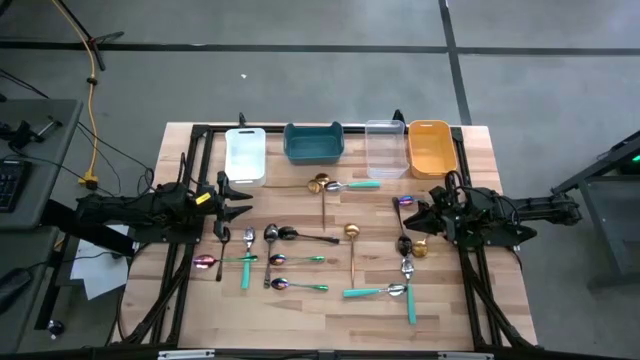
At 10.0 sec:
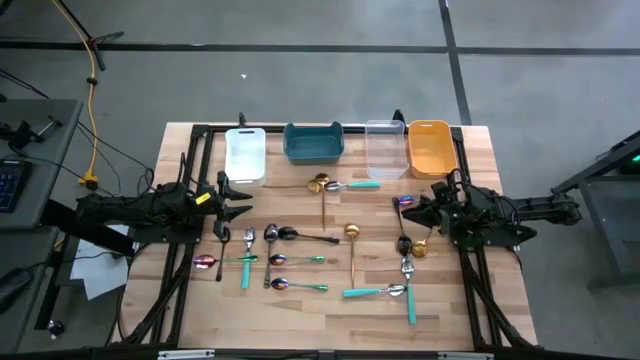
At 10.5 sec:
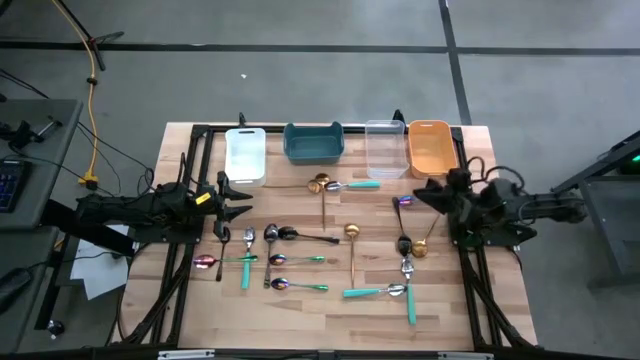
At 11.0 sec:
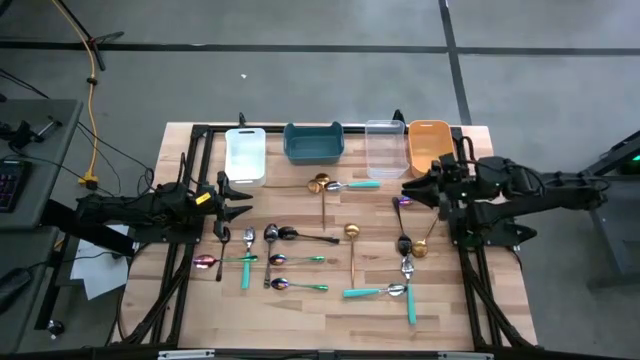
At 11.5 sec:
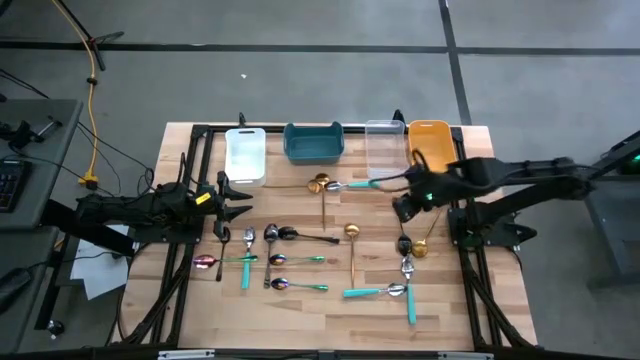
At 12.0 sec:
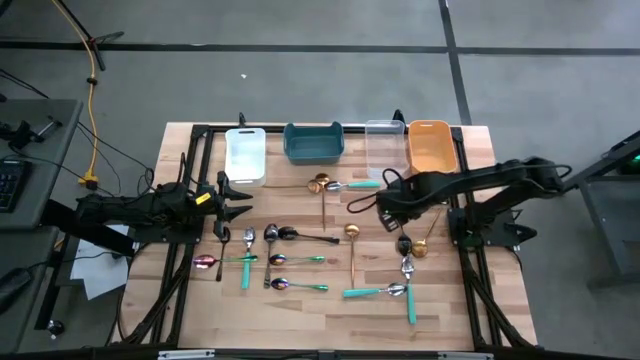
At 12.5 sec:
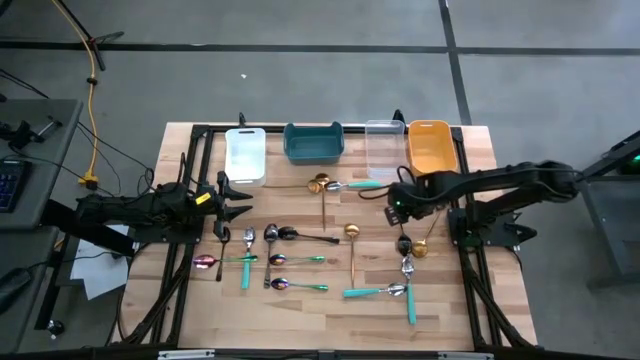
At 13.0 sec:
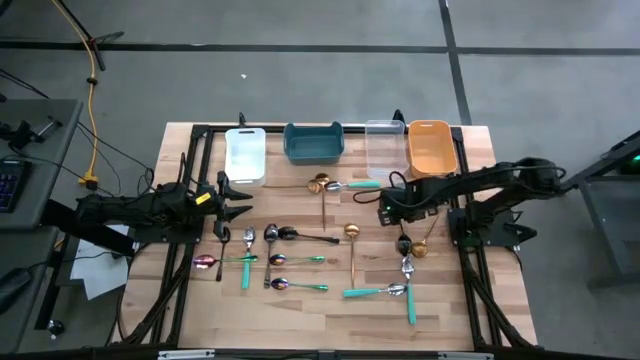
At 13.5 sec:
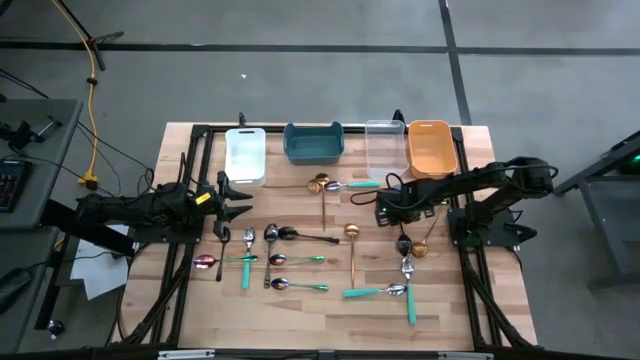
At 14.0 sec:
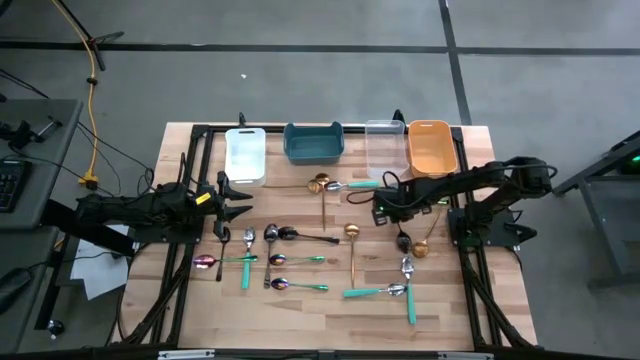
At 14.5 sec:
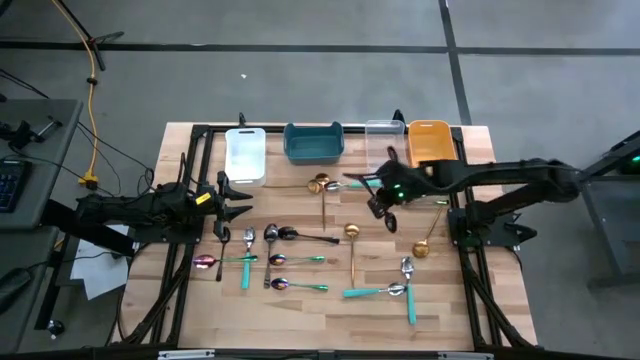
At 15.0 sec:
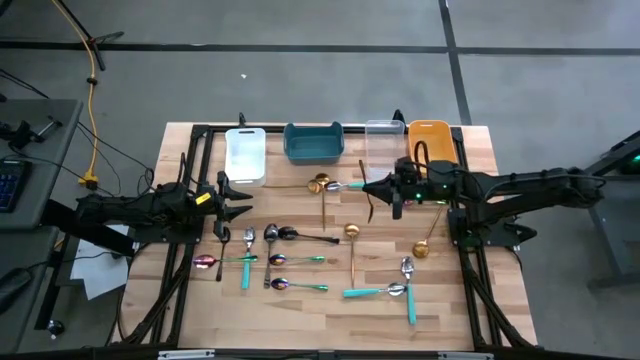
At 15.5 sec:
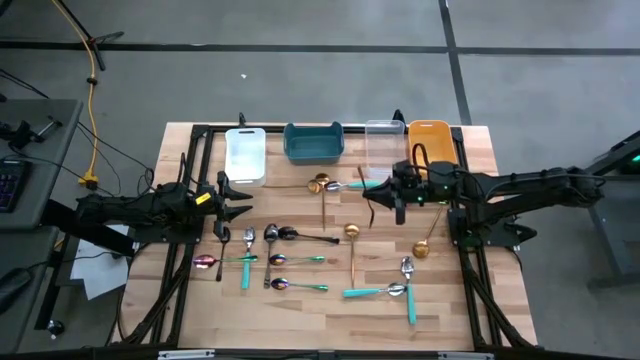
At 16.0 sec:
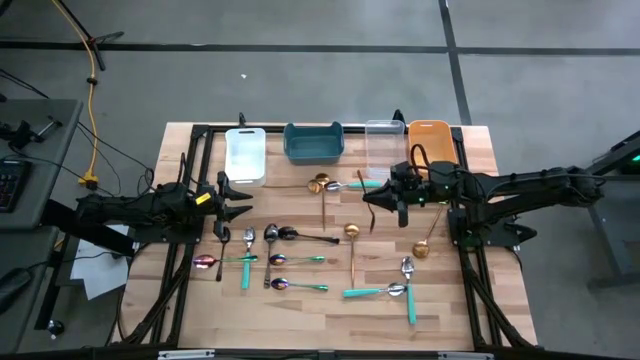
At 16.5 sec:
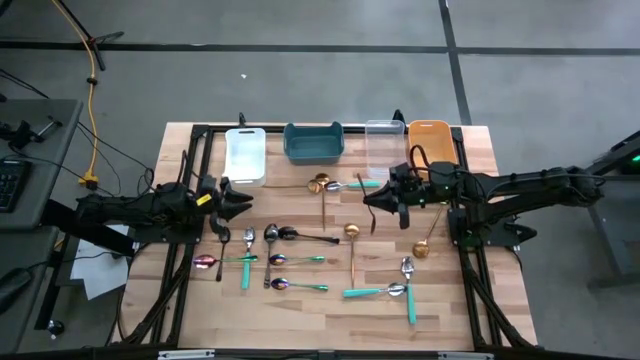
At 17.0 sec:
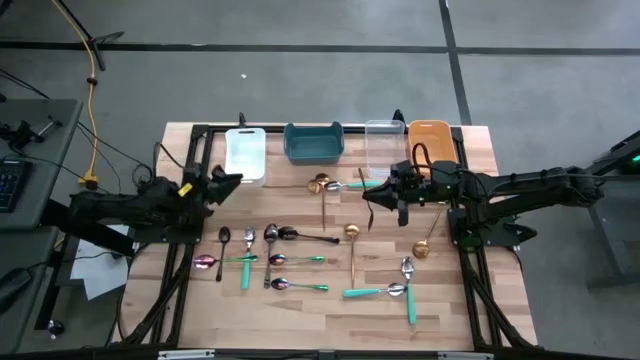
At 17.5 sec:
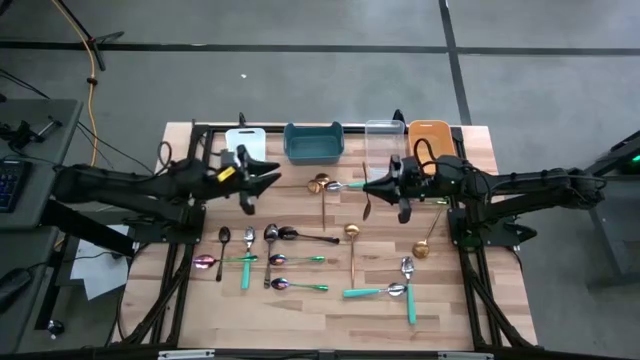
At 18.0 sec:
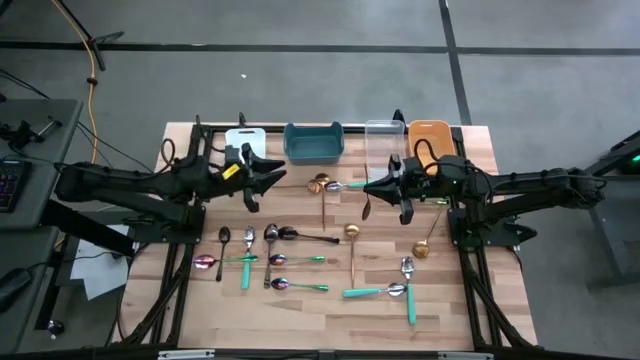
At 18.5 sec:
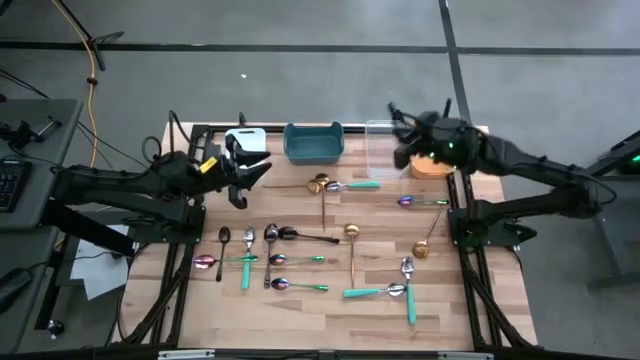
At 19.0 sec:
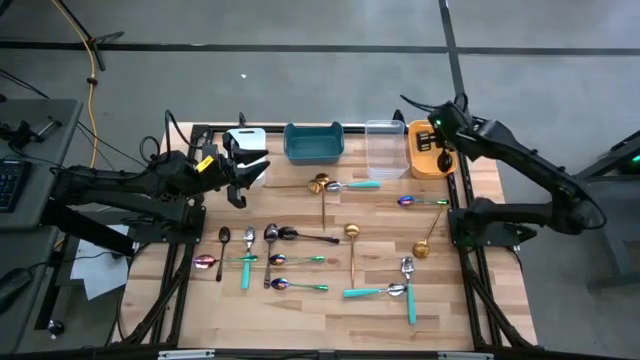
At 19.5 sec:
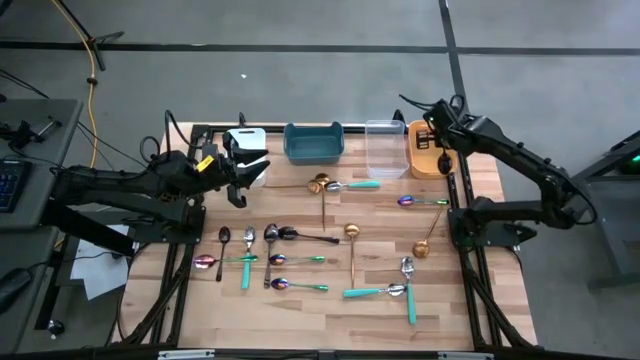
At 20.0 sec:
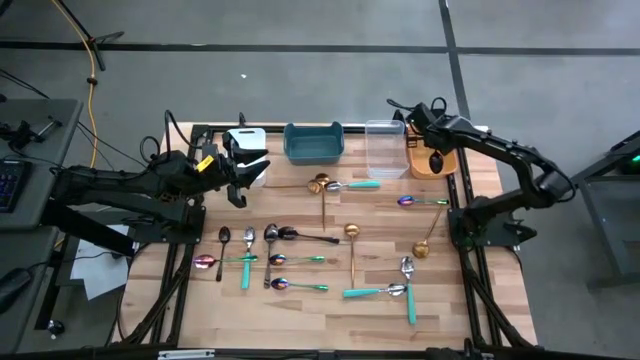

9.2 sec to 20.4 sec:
Task: Sort silverware by color (type)
Put the black spoon into the yellow bin

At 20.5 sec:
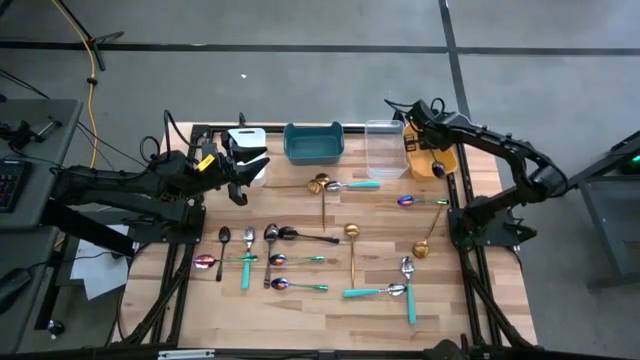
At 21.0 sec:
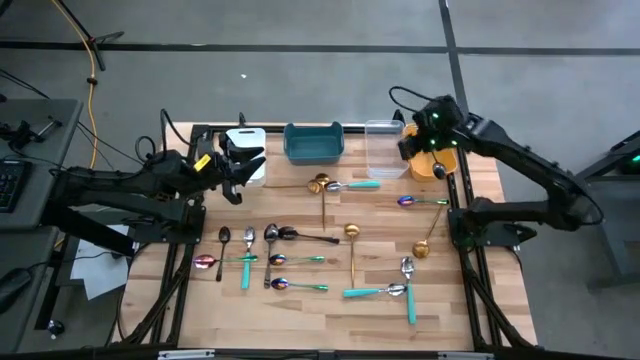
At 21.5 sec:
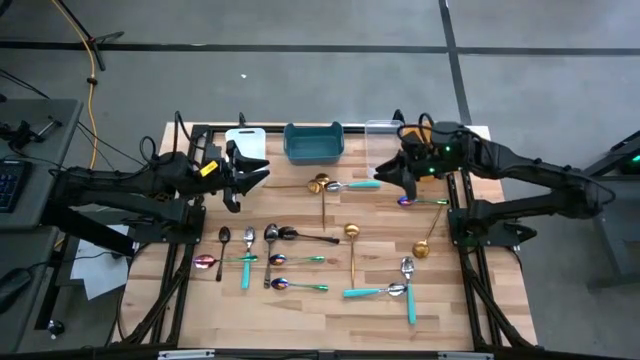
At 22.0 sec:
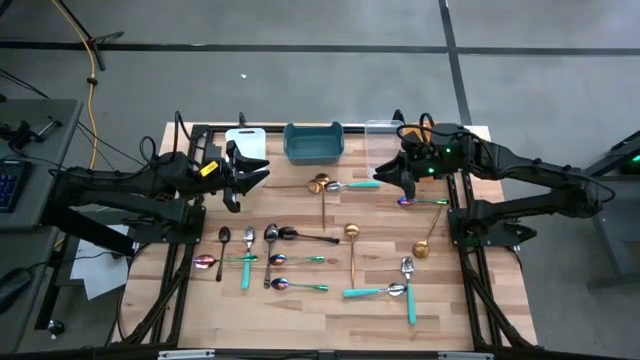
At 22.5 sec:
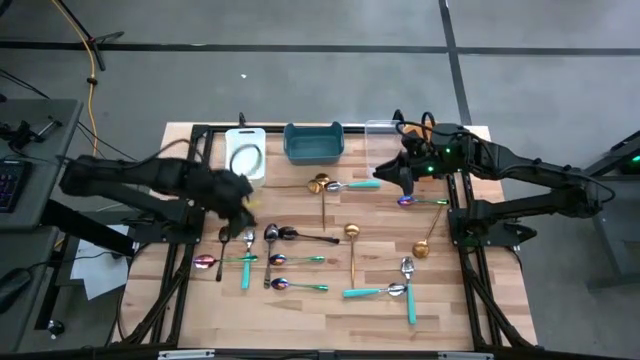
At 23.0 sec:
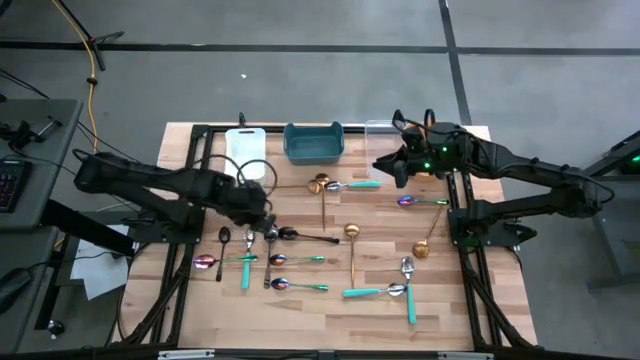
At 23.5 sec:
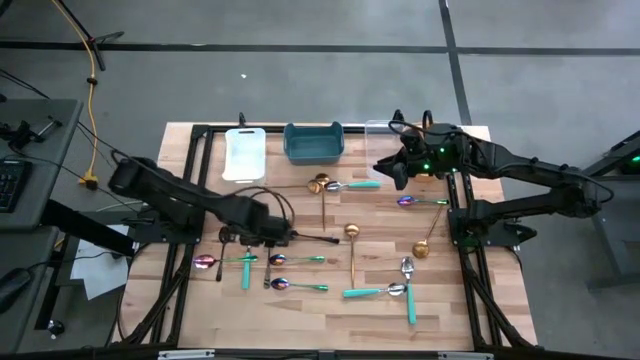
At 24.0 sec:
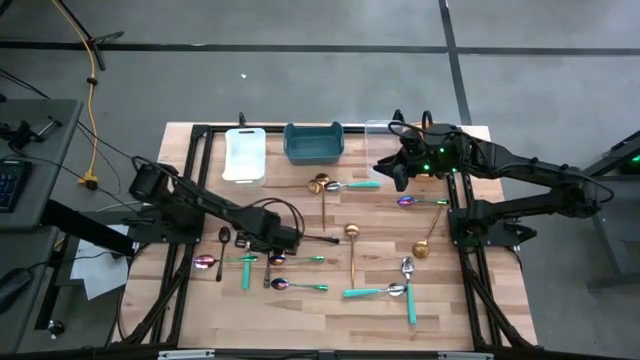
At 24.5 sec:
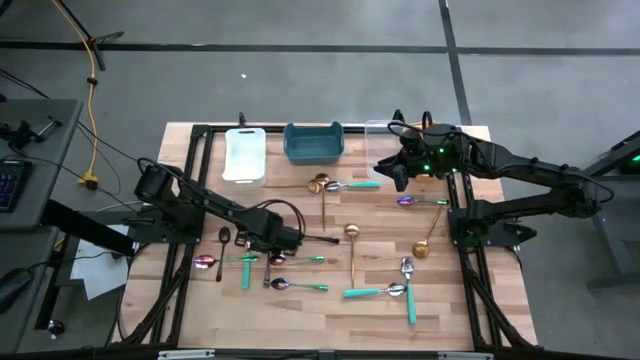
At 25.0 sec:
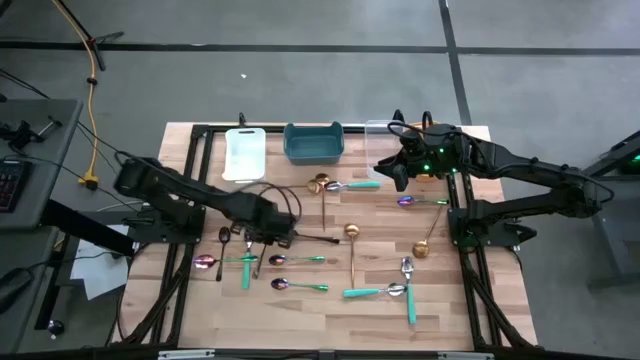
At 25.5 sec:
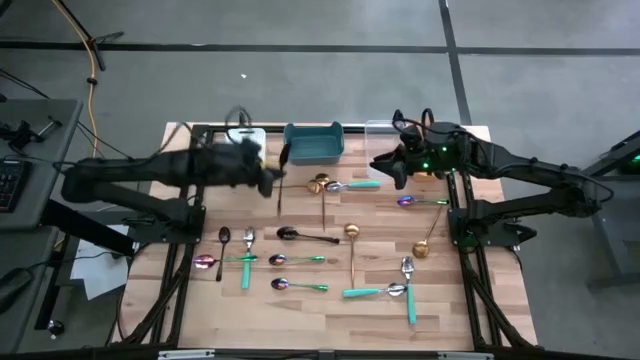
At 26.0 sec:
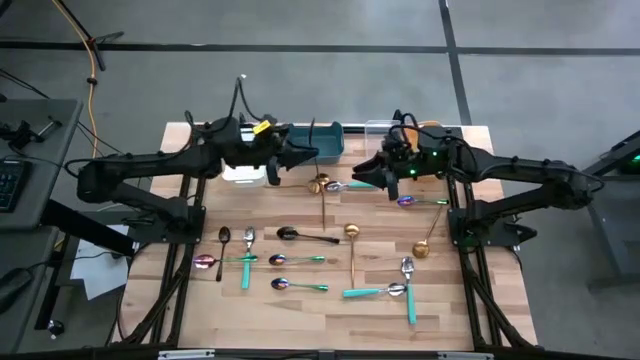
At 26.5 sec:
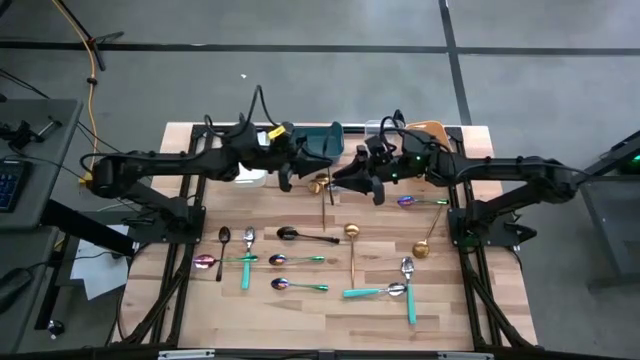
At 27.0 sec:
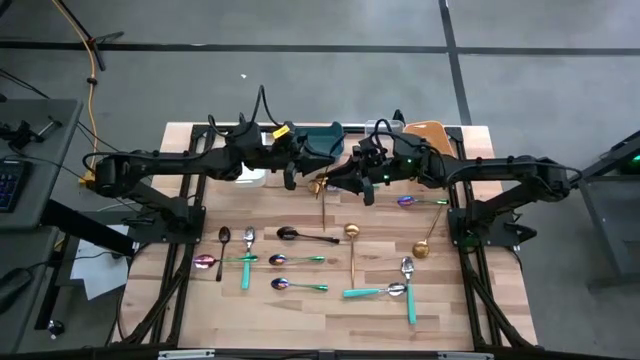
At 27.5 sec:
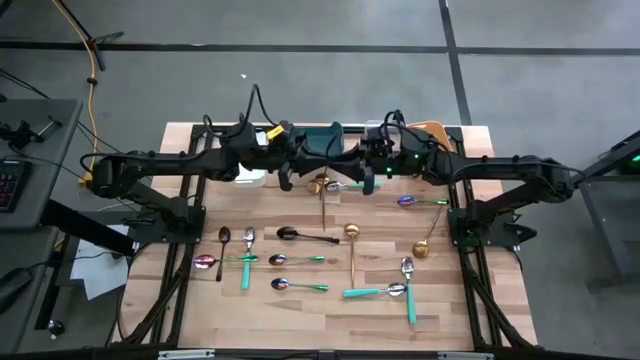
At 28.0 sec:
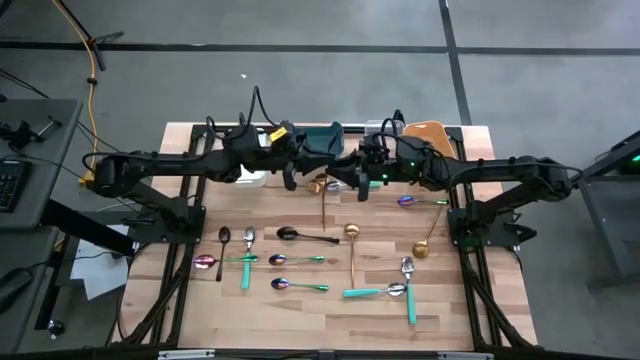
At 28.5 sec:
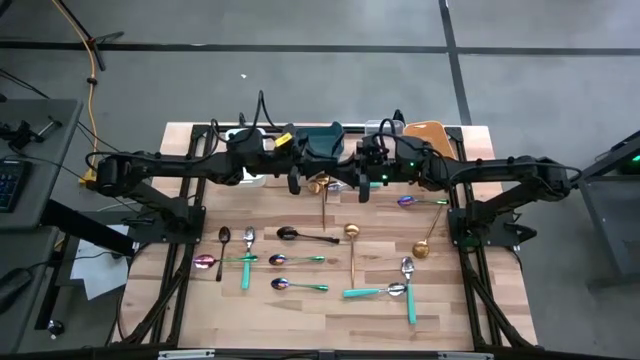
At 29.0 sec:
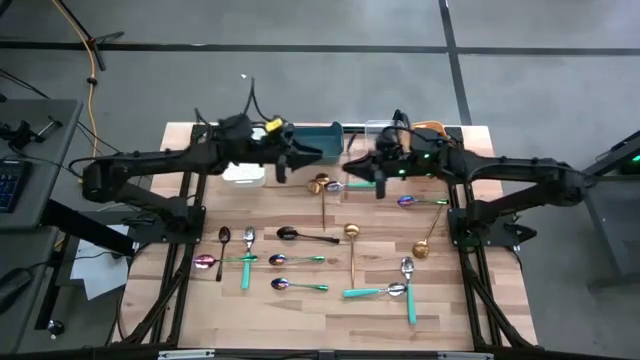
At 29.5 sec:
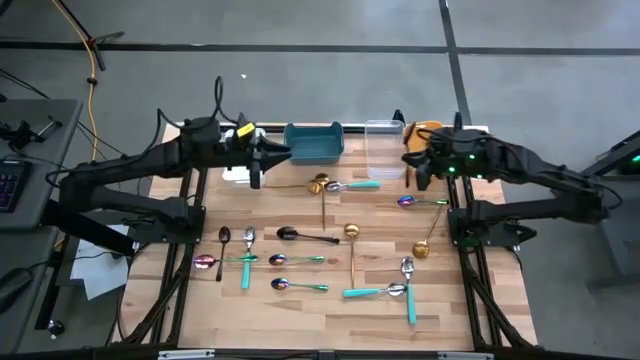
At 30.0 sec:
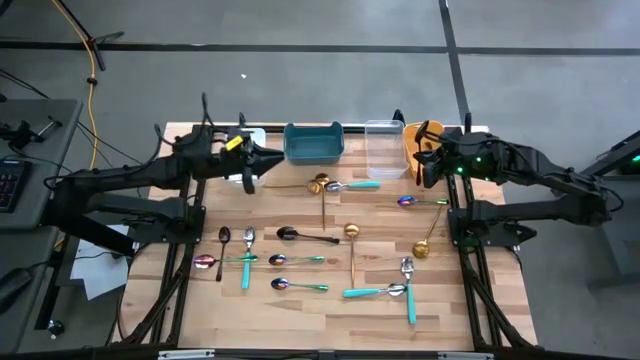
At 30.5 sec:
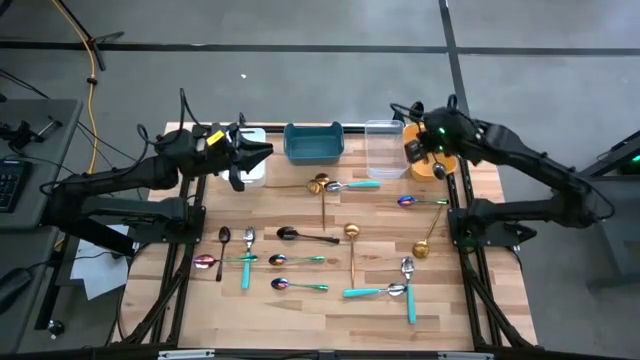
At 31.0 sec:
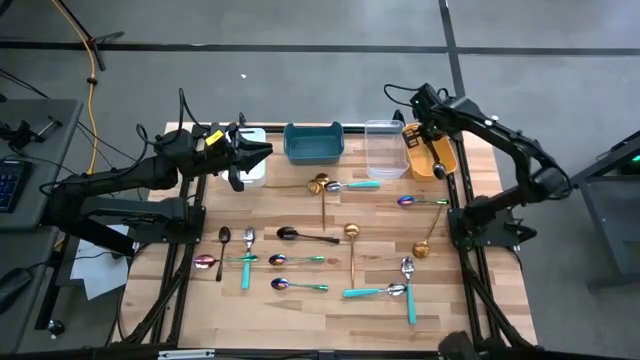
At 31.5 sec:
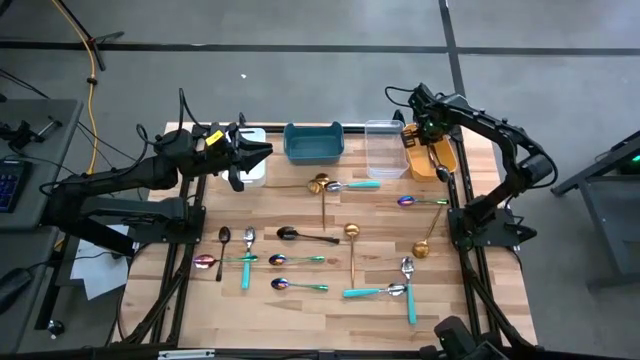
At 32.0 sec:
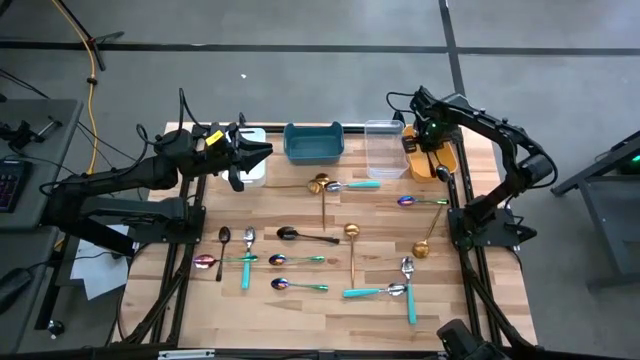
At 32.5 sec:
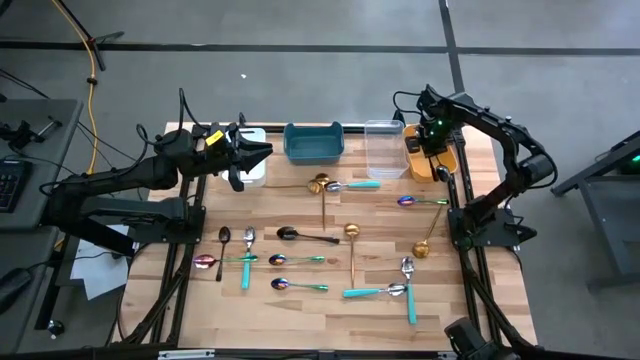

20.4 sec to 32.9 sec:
Put the black spoon into the yellow bin
